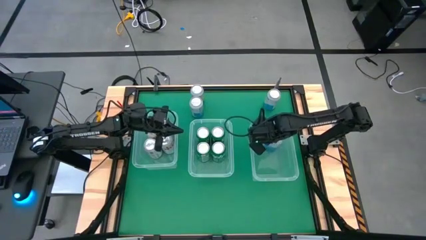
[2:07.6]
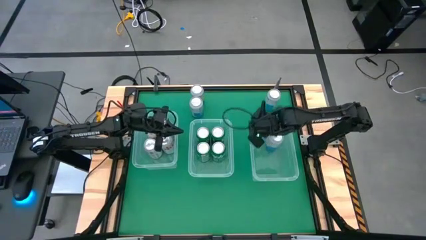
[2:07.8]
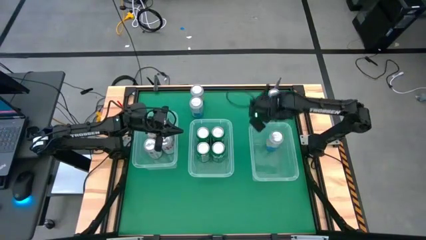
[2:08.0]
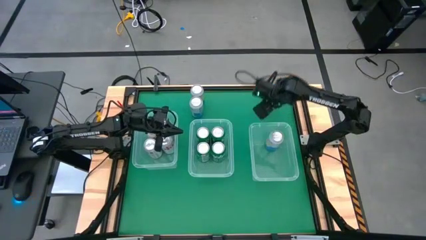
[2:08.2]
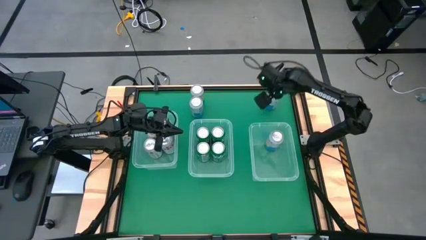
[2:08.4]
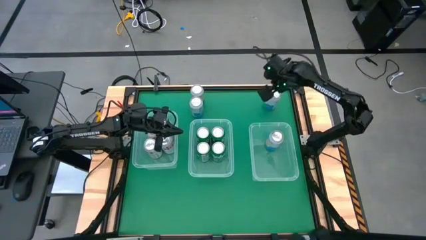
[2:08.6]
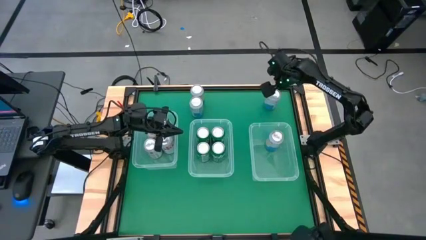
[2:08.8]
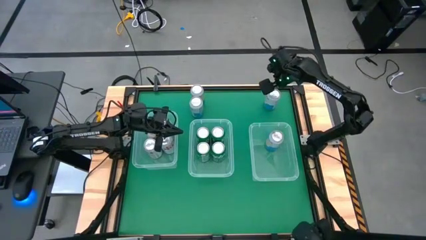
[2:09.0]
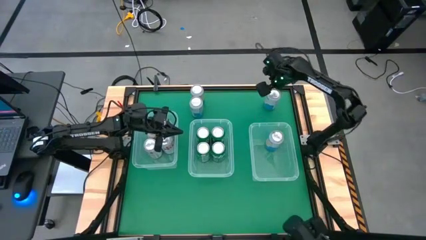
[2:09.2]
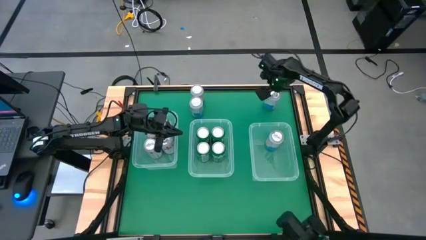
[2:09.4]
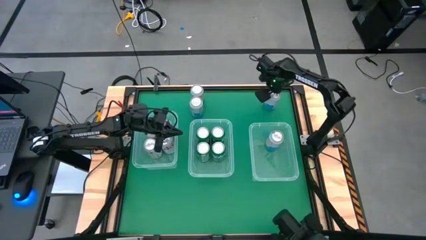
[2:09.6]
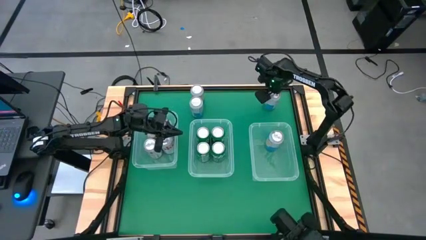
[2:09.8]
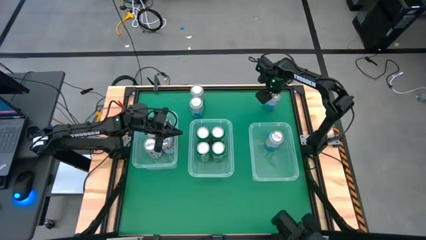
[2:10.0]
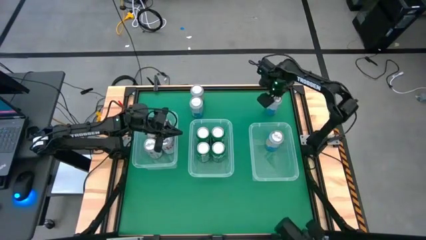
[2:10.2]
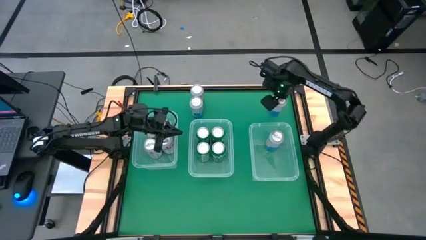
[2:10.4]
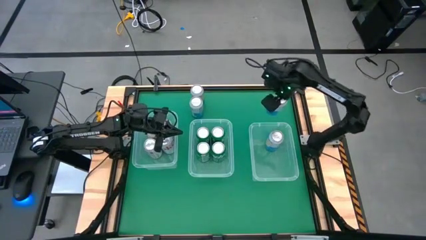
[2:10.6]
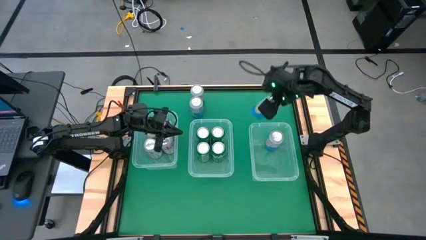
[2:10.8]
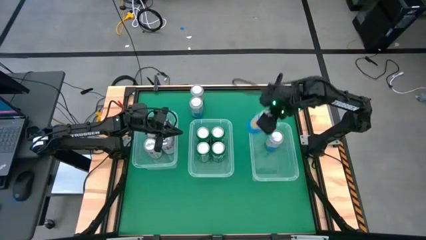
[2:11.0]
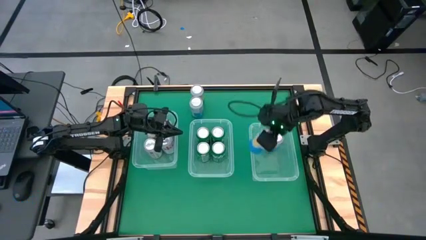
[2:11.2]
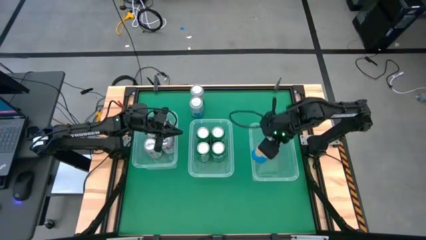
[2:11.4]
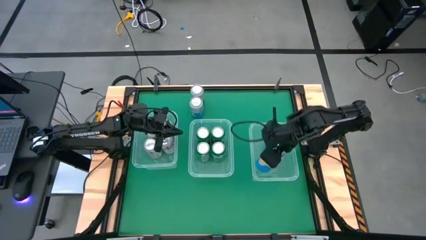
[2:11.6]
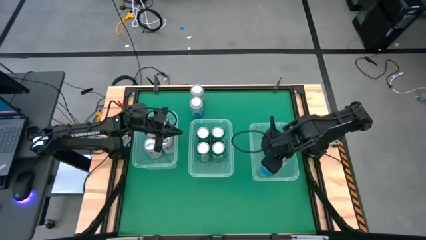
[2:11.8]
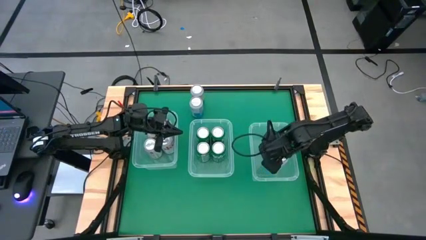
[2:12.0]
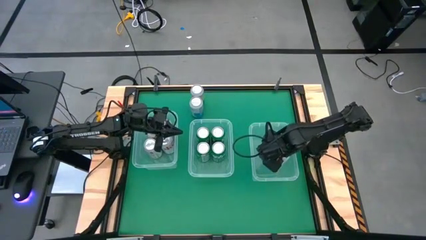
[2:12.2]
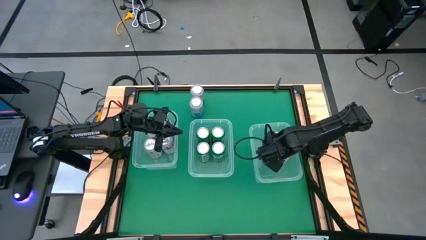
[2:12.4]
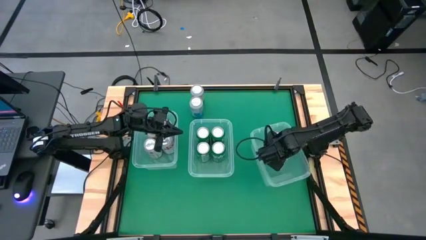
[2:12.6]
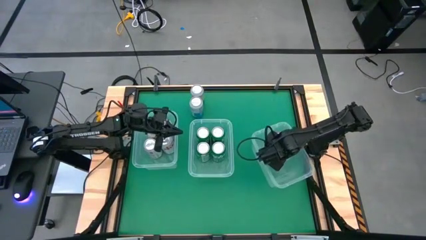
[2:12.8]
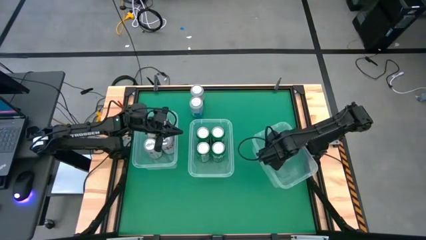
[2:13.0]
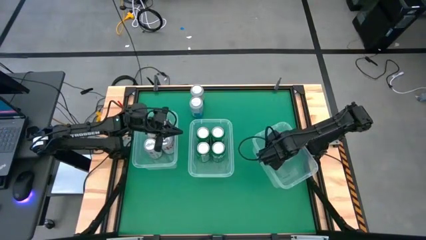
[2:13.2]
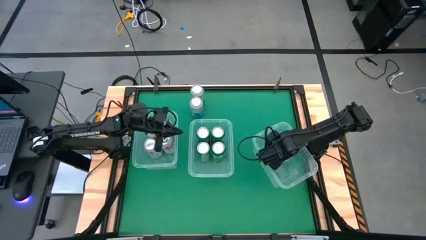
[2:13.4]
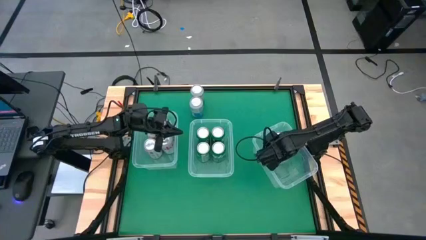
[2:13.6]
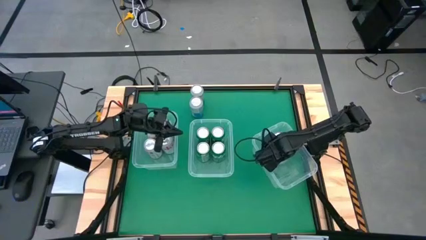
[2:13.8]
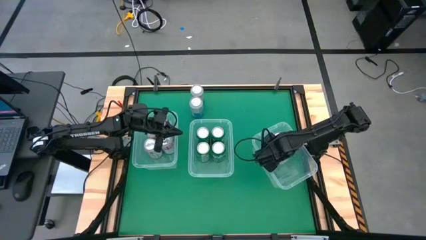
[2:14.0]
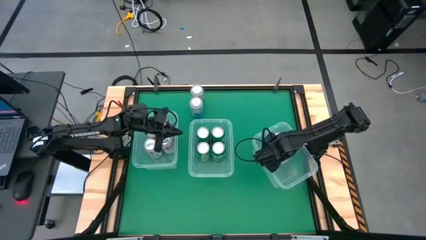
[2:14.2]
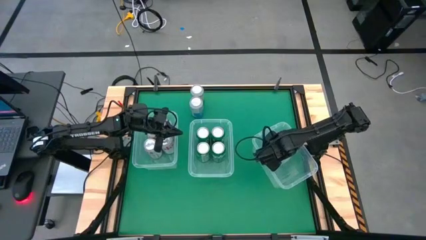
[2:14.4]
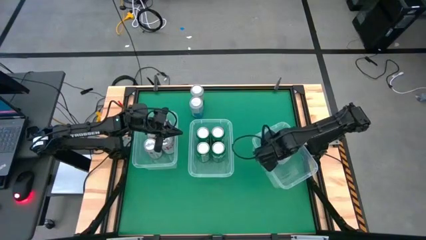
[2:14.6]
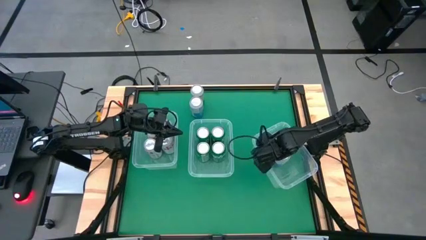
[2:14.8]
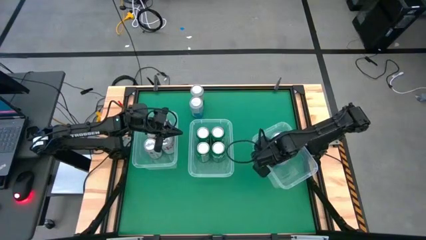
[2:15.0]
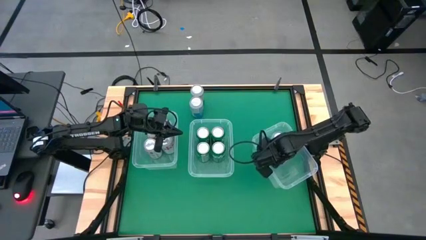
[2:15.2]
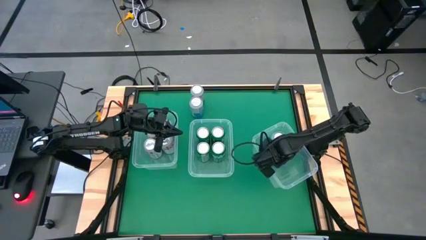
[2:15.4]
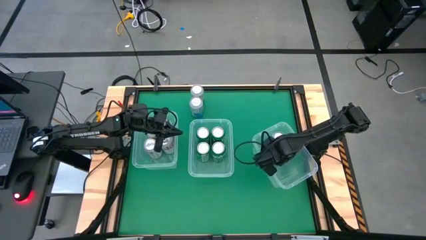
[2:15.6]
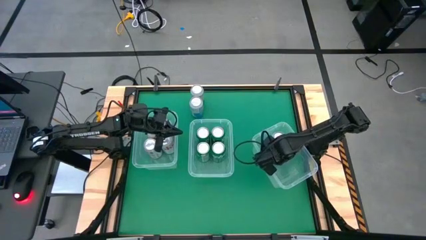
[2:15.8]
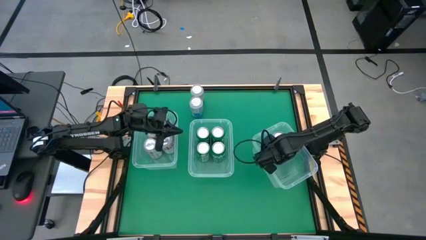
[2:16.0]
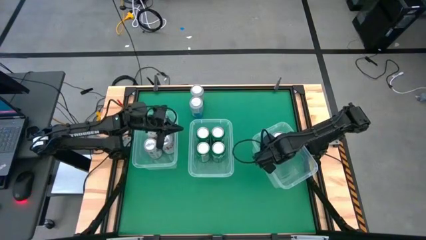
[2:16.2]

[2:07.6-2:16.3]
Task: Sort soda cans
Put the blue soda can into the right bin

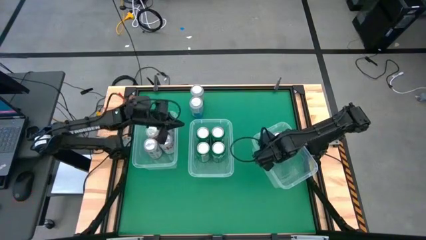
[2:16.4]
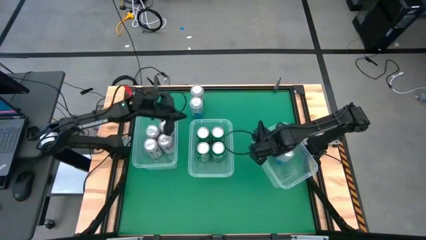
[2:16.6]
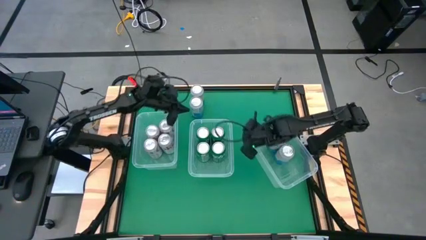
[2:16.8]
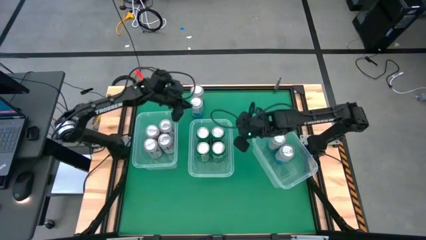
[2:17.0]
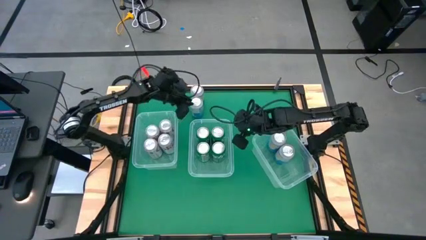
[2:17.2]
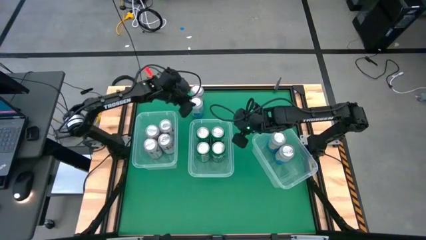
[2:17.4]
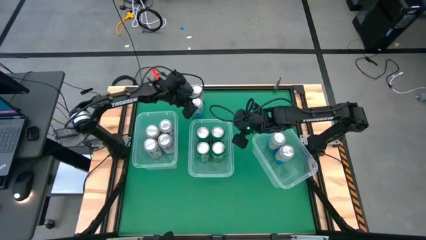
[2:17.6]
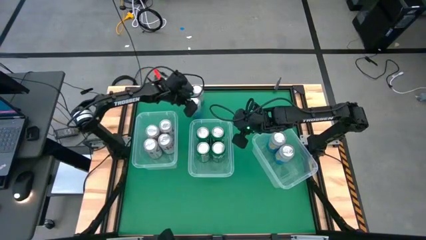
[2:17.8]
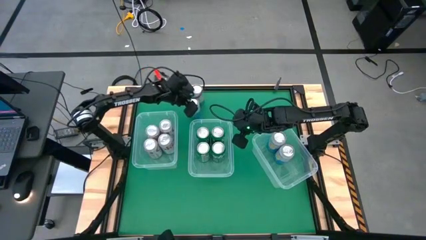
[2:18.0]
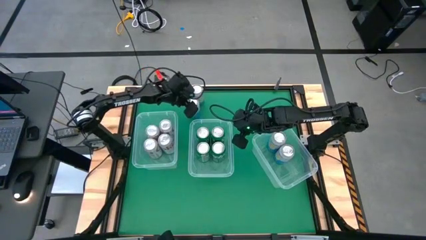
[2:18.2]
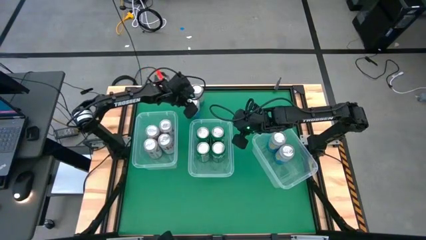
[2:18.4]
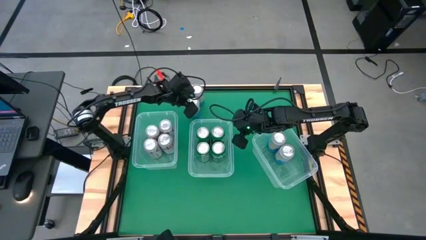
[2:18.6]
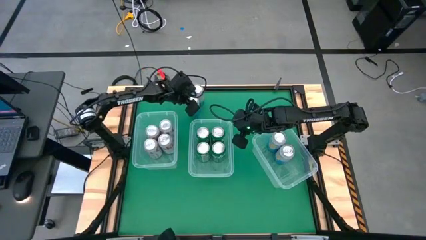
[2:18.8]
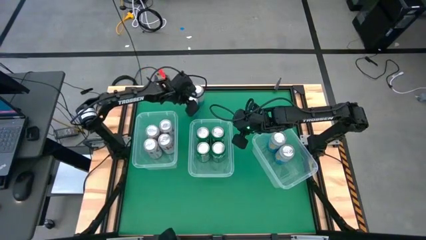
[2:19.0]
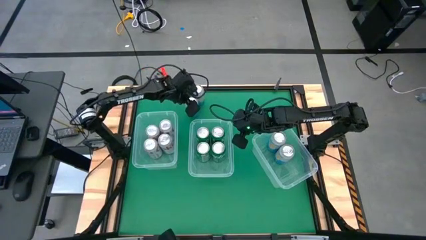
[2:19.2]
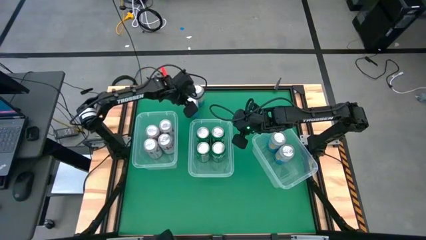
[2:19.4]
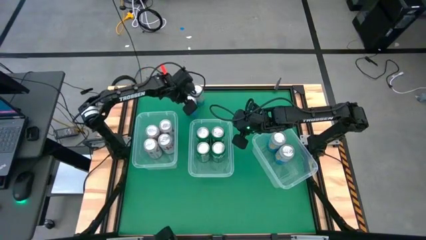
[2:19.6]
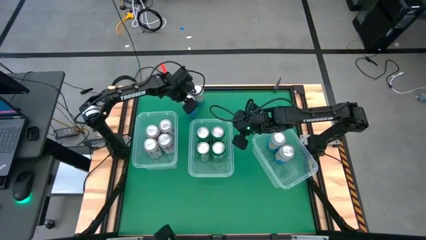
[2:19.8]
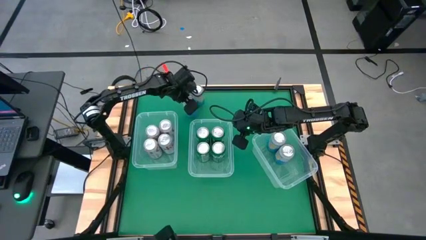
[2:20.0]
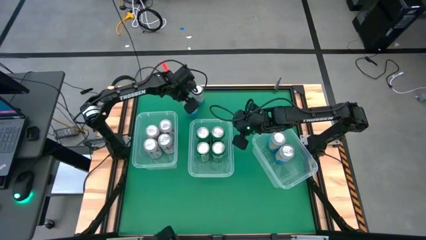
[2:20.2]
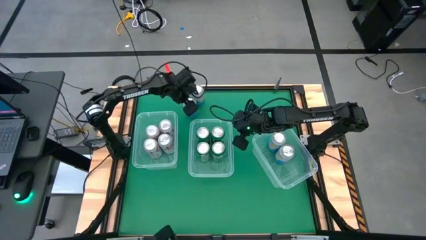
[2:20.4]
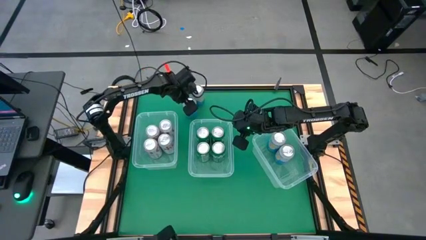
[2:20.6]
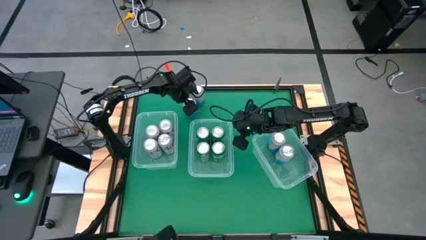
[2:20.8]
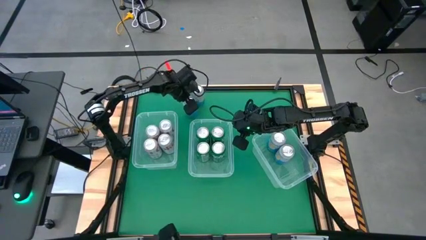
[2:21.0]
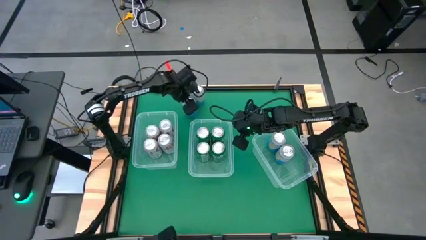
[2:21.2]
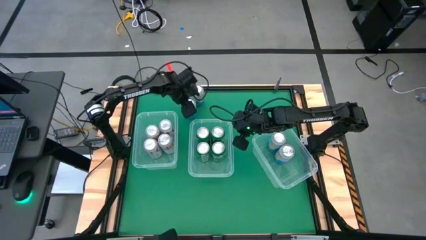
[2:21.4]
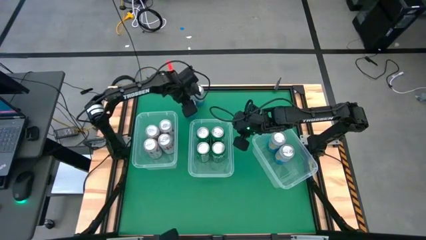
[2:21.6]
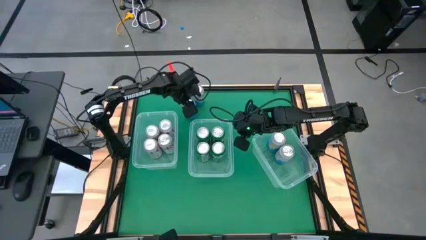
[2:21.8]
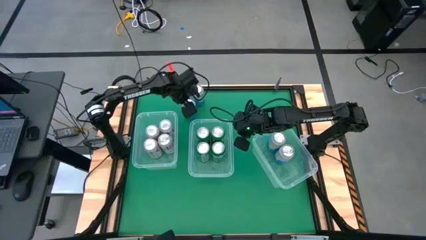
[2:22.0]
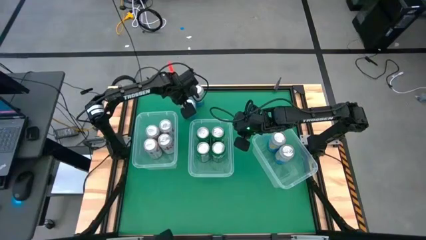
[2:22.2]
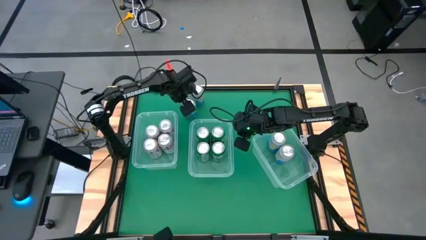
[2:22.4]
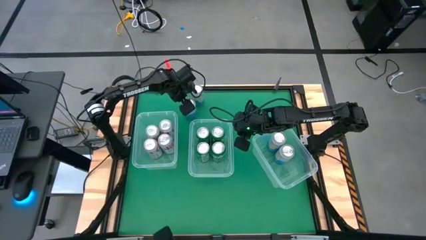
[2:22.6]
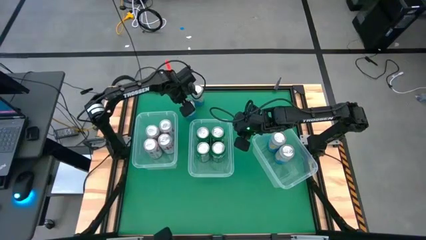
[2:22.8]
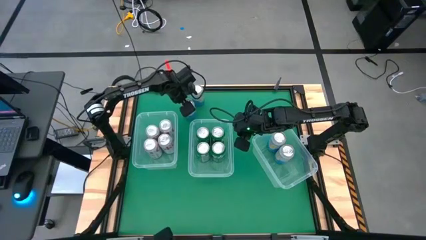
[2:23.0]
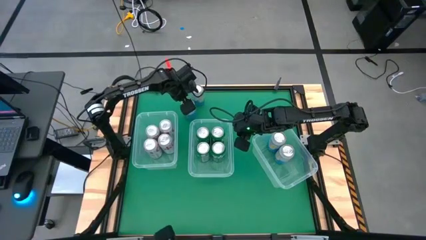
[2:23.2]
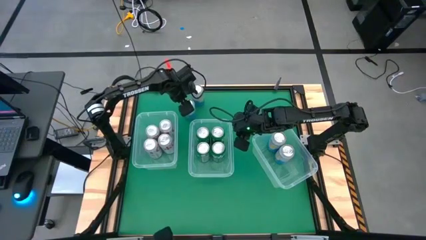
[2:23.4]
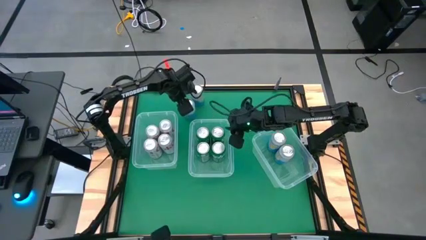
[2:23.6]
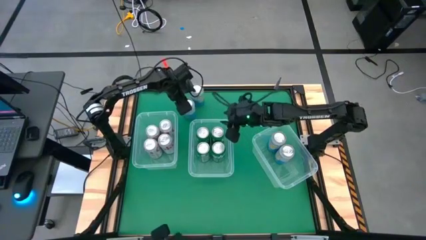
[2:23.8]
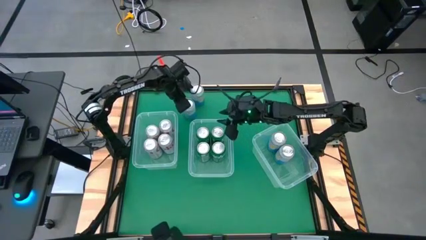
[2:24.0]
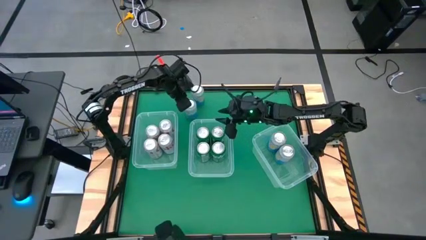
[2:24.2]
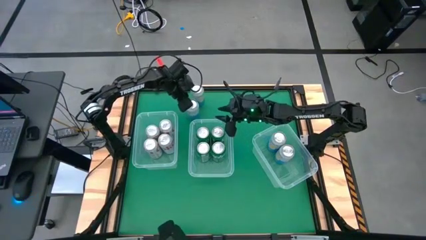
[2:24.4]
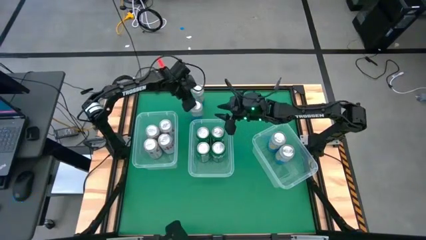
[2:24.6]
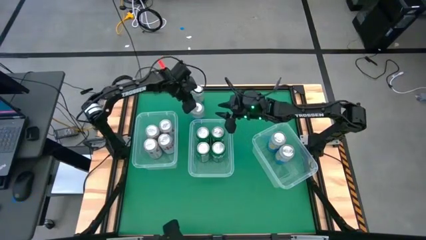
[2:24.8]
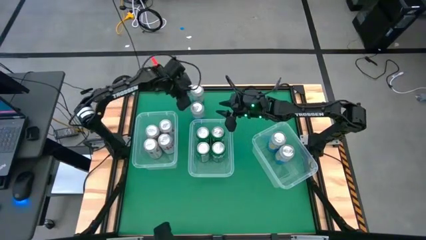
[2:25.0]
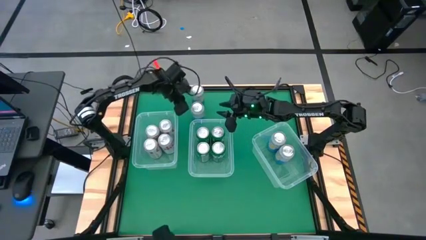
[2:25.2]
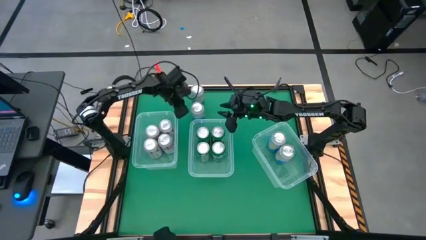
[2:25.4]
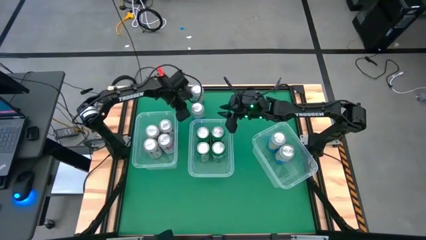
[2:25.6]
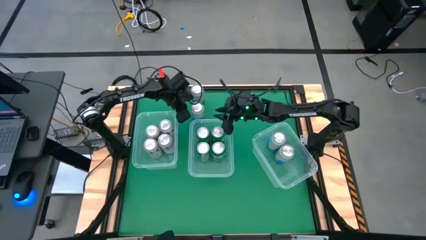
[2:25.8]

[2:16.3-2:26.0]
Put the blue soda can into the button right bin
